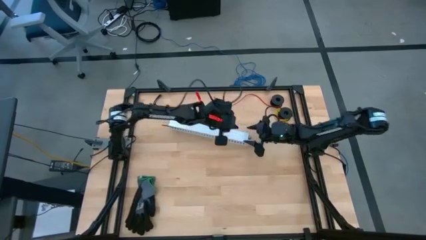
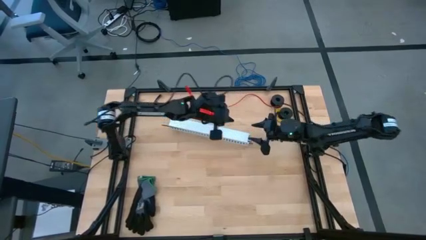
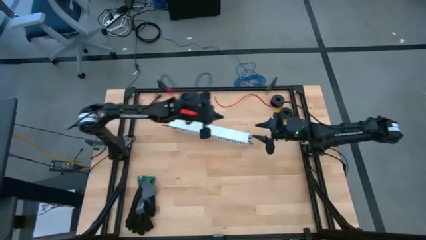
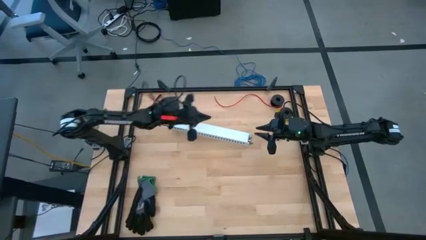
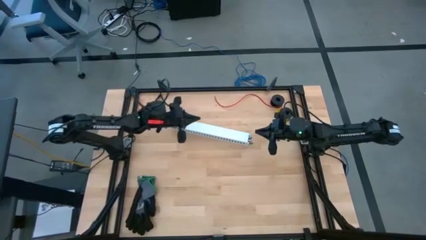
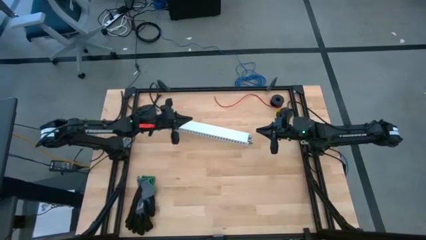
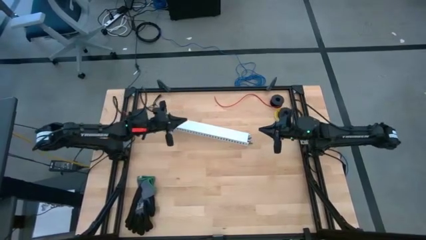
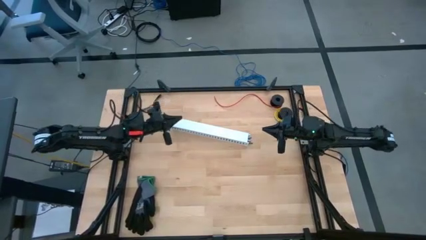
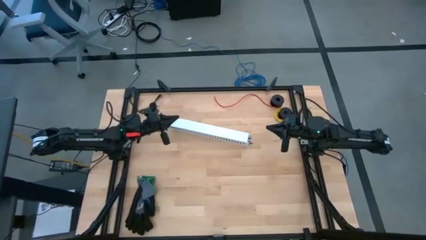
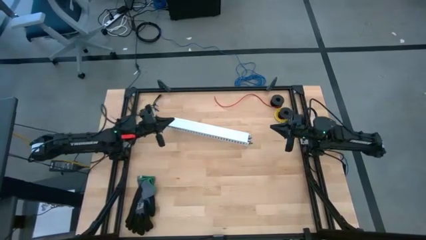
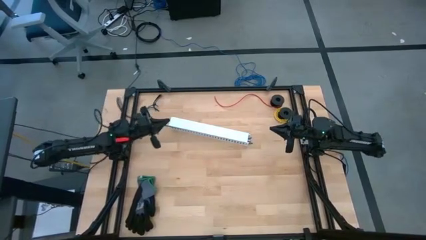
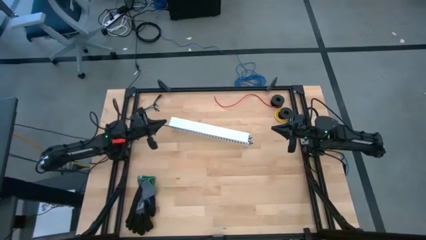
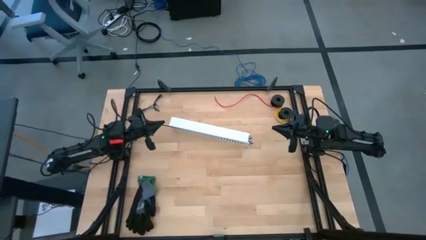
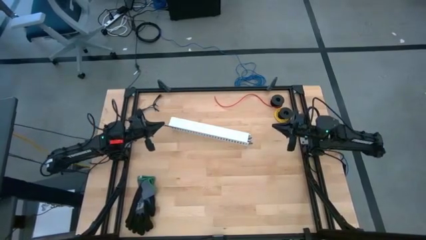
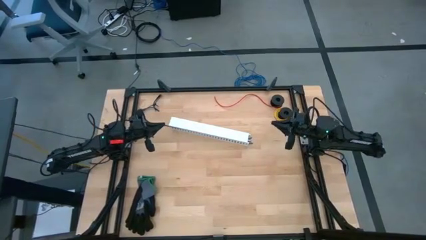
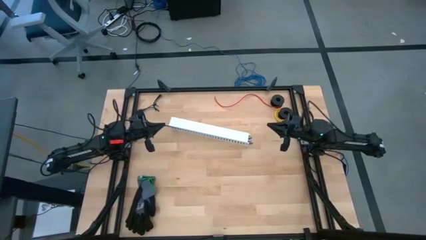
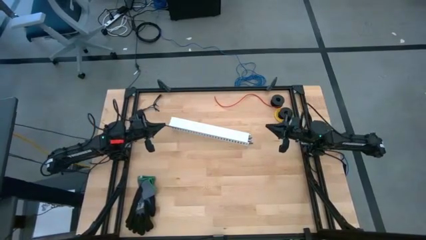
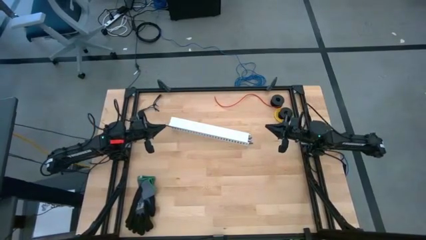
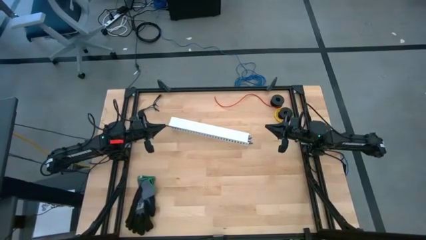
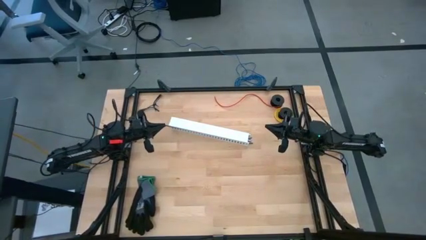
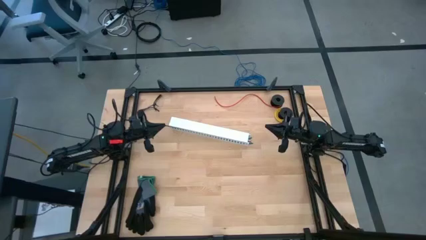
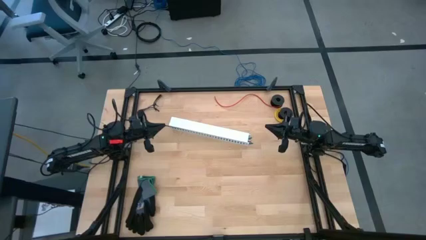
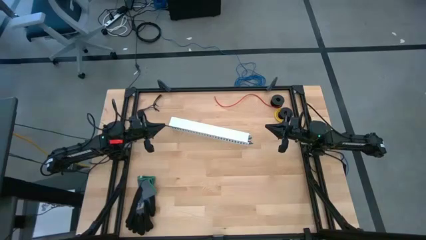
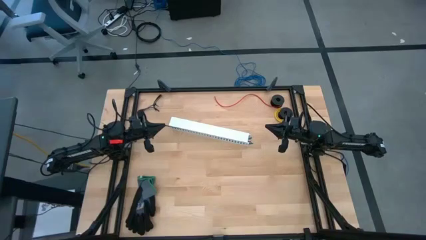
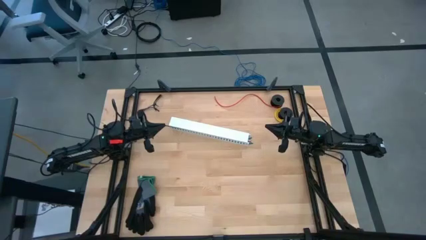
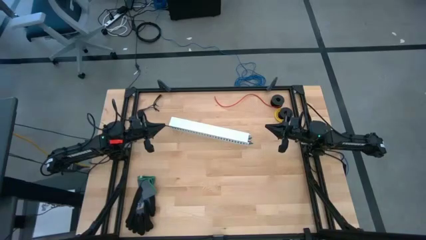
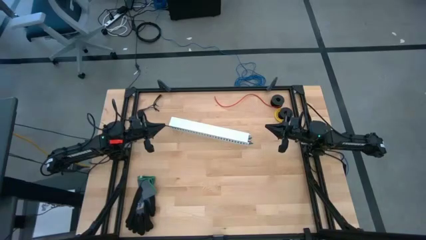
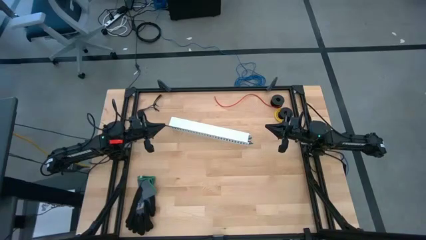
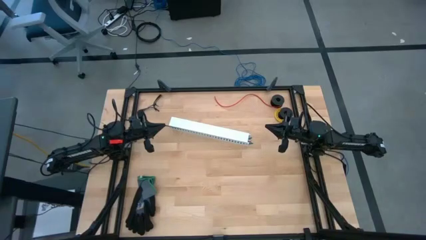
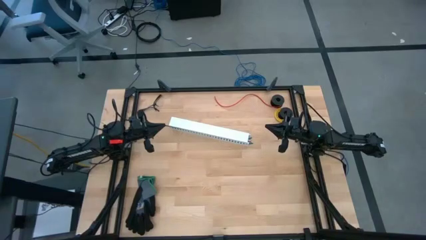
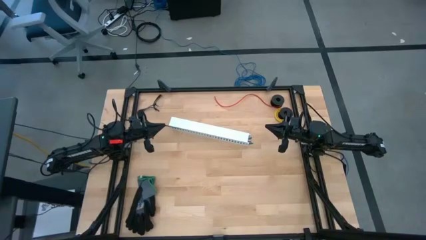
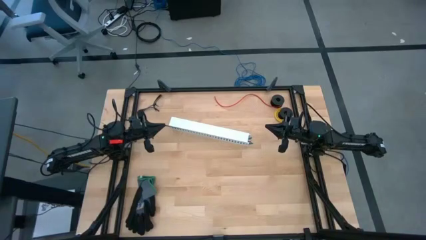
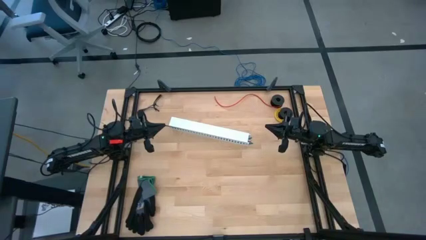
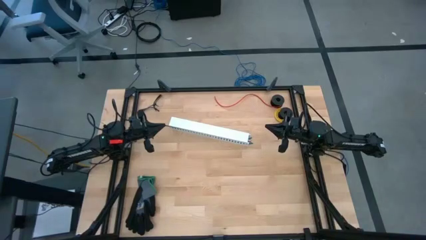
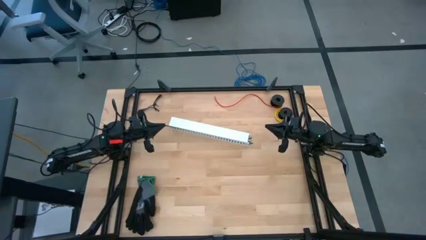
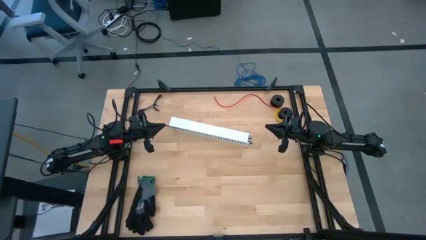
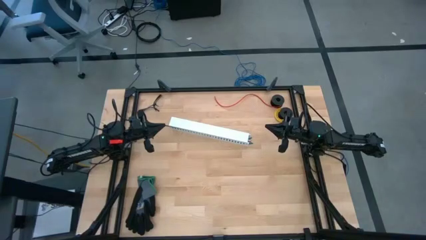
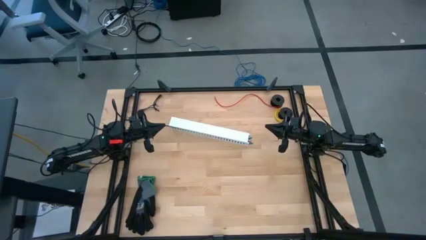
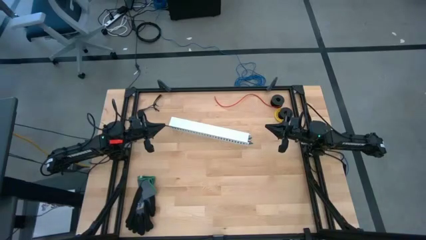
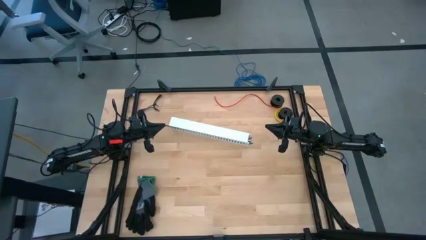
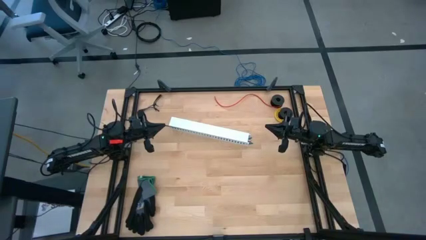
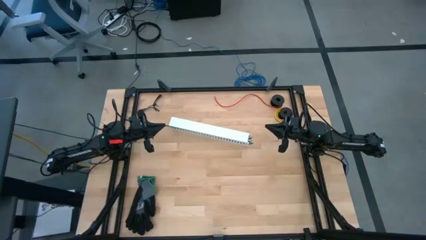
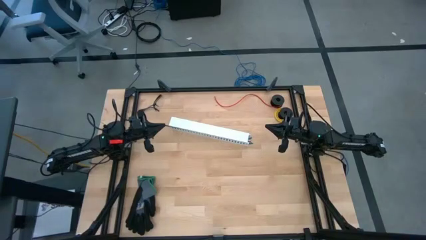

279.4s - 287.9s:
Task: Ziptie cables
Return to Home Position

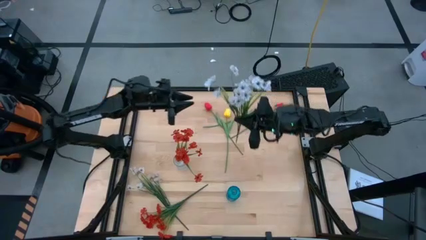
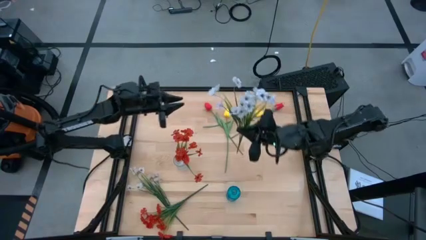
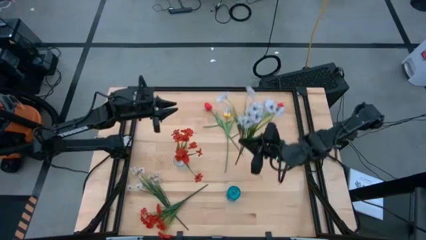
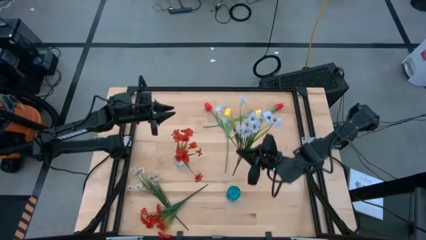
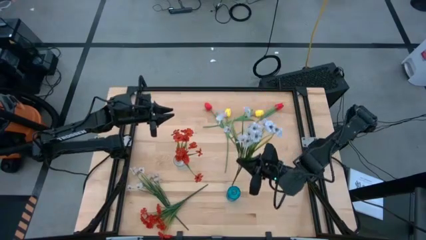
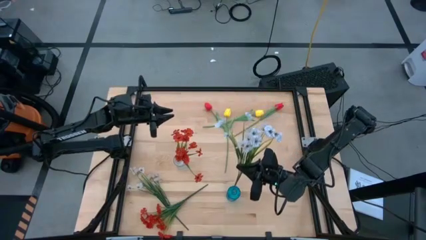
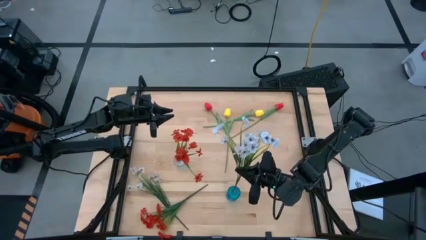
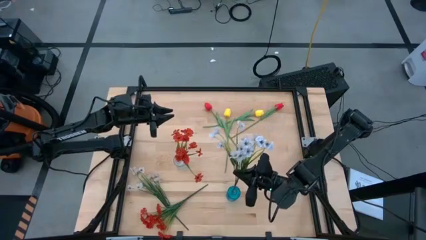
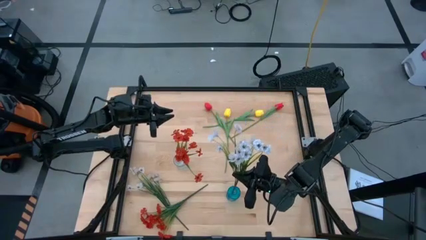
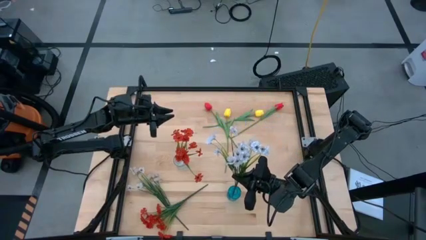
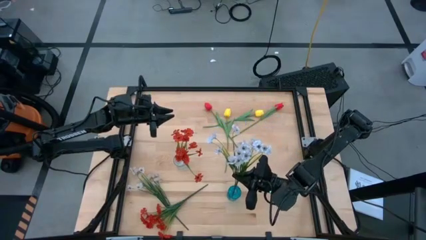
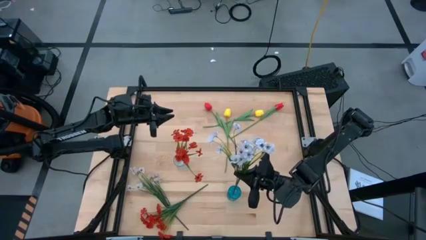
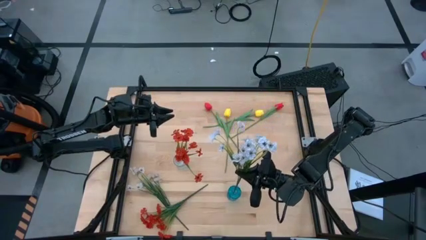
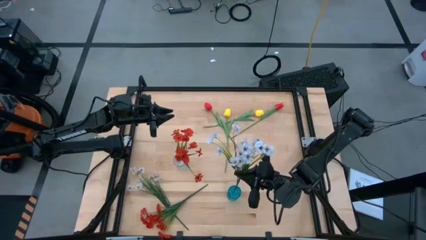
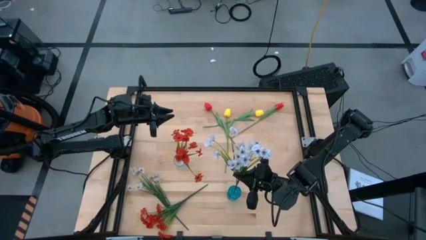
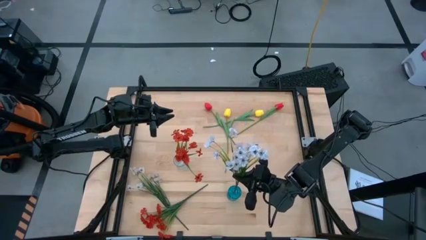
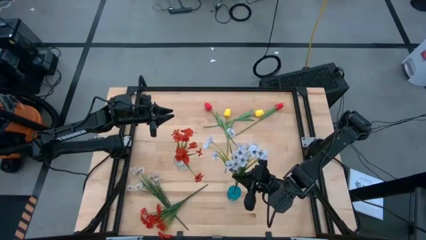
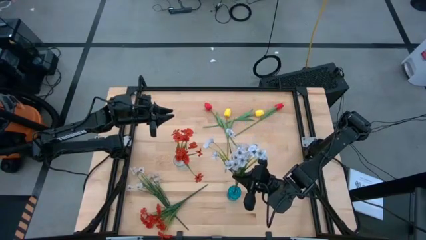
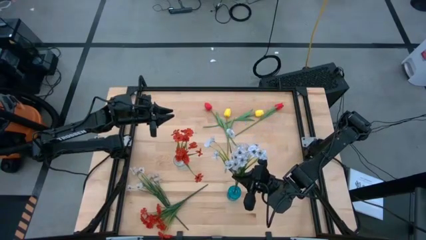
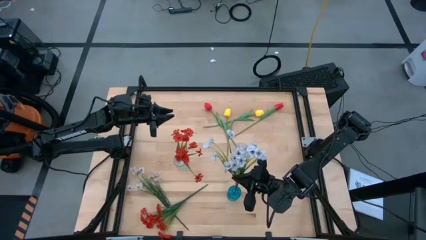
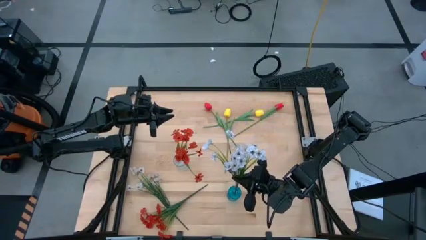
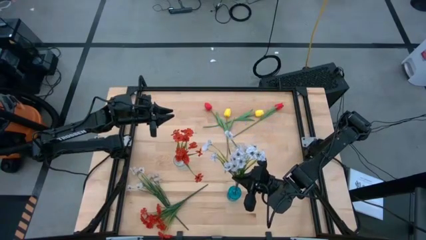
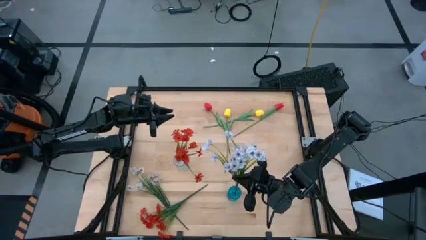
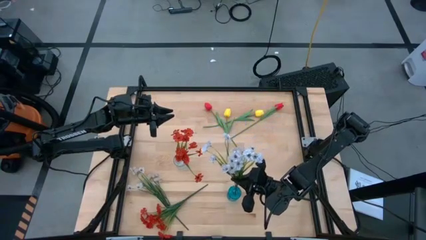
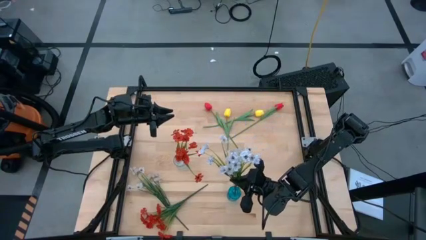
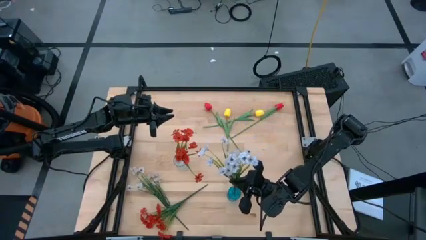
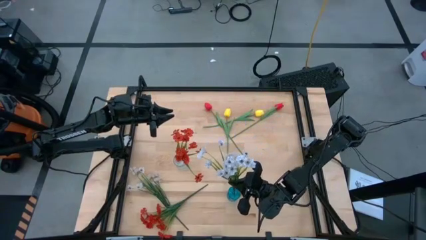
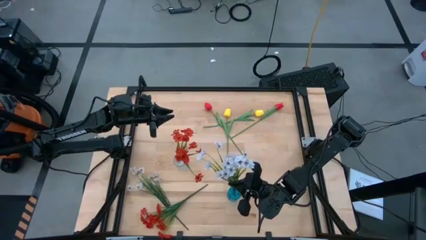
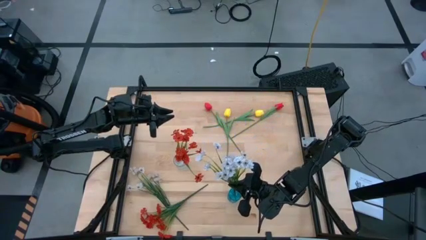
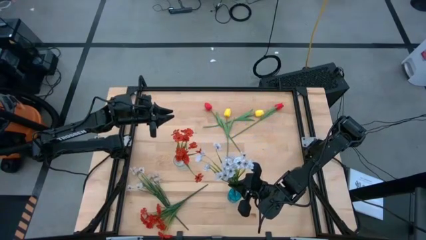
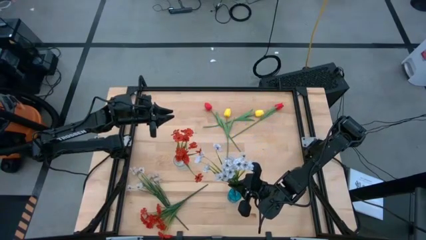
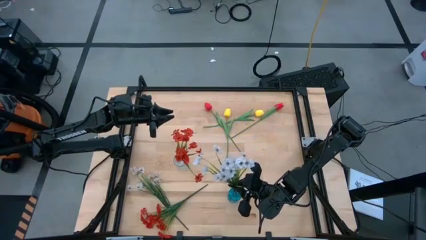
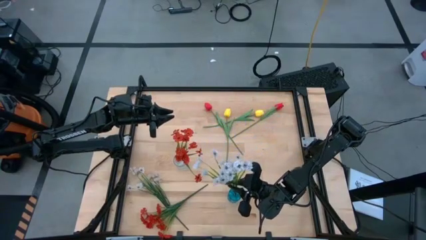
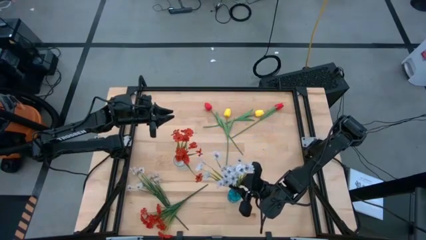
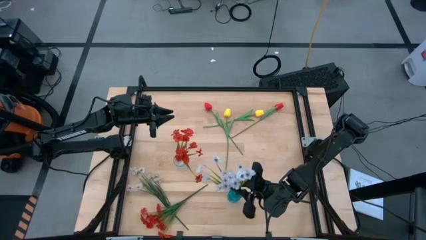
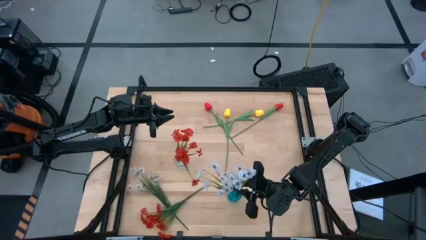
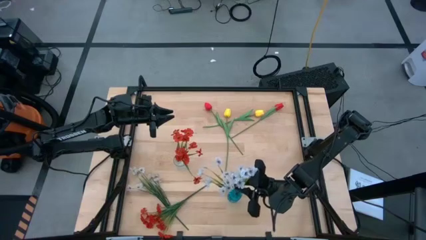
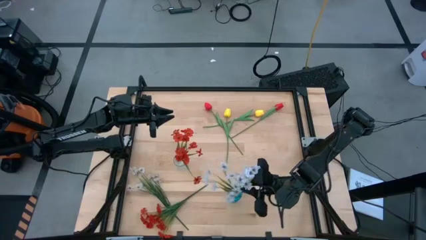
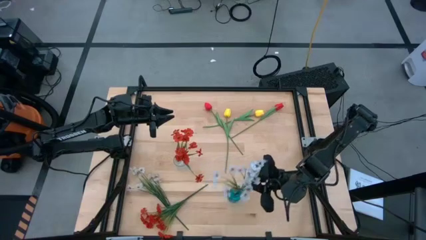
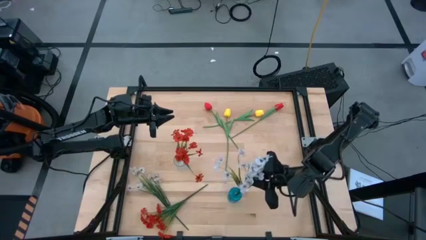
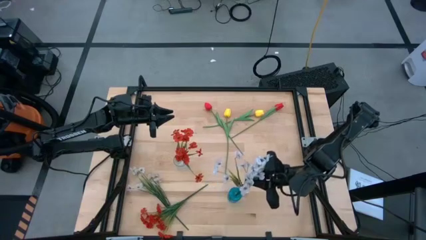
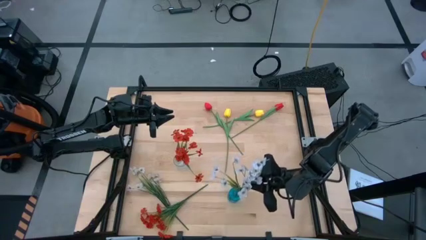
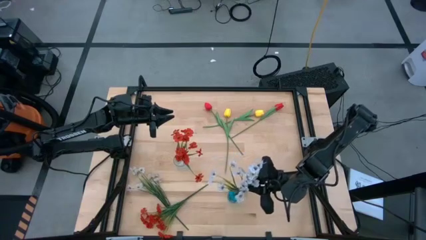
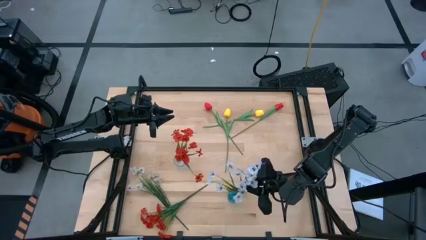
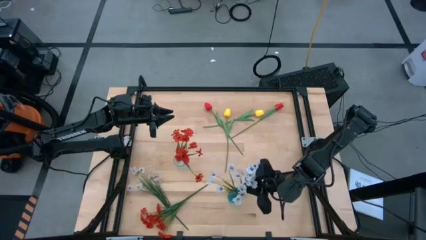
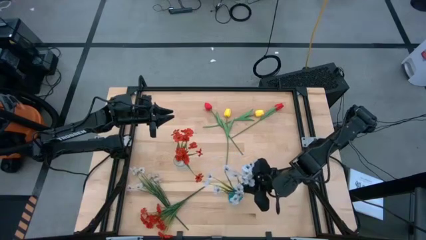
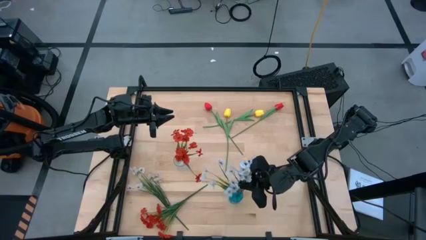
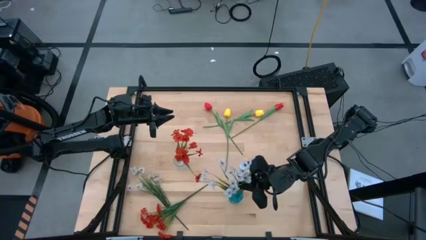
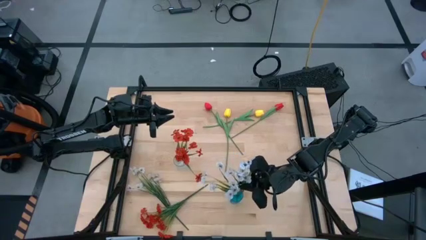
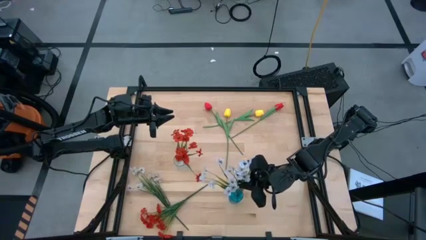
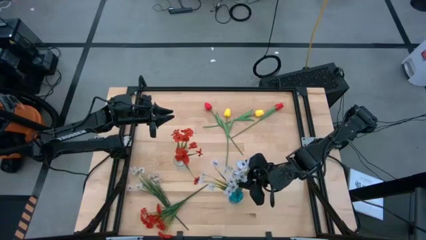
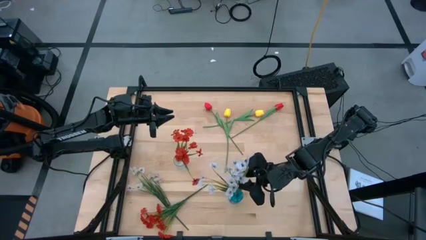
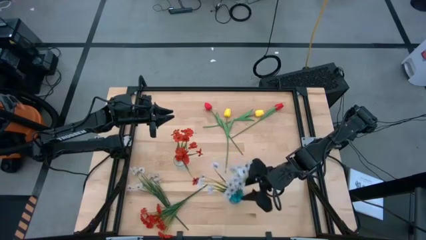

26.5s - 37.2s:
Task: Sort flowers into vase by color
Put the top white flowers into the blue vase
